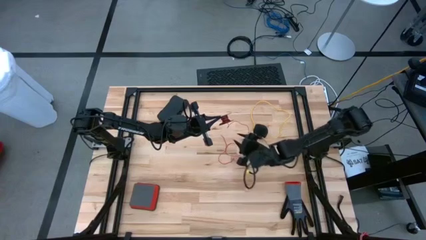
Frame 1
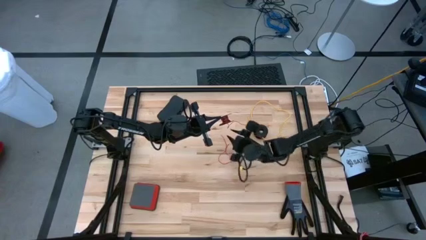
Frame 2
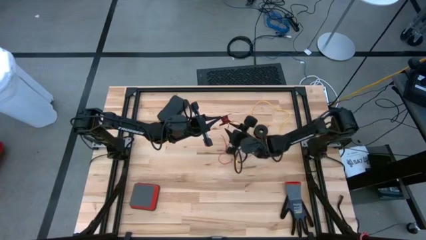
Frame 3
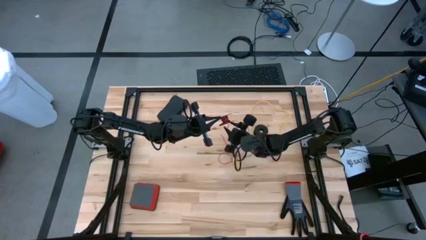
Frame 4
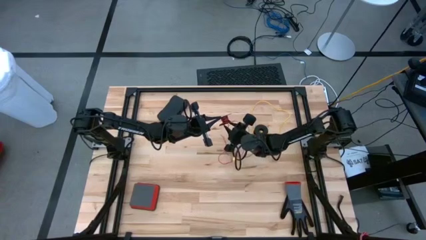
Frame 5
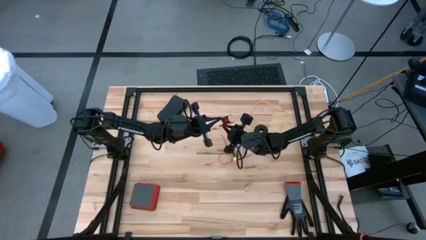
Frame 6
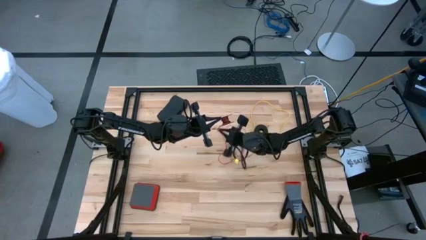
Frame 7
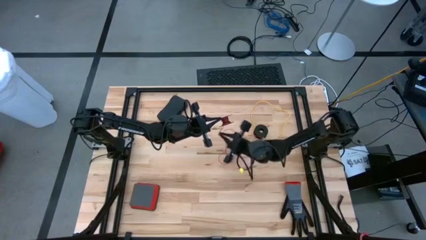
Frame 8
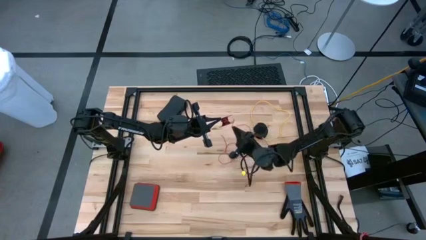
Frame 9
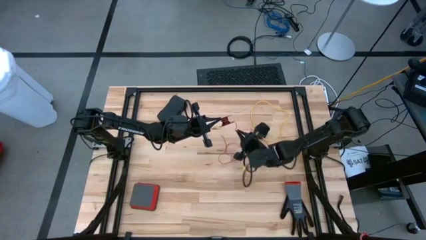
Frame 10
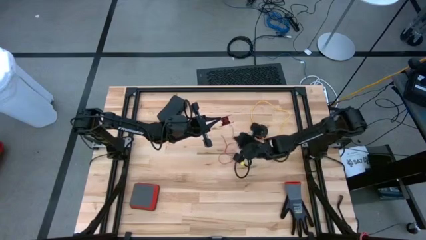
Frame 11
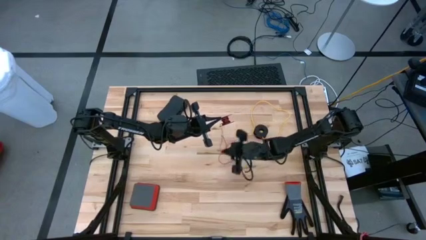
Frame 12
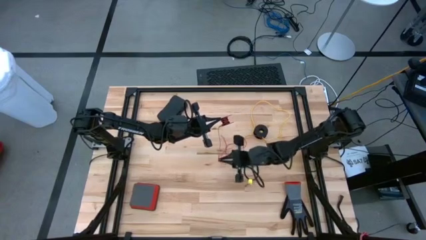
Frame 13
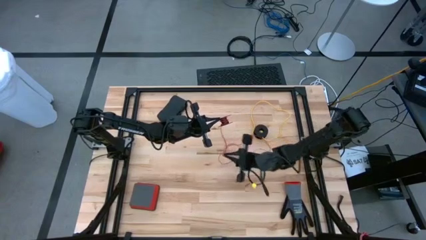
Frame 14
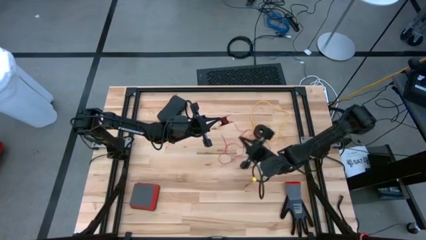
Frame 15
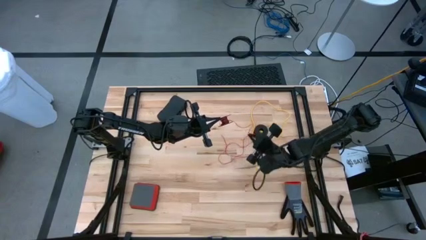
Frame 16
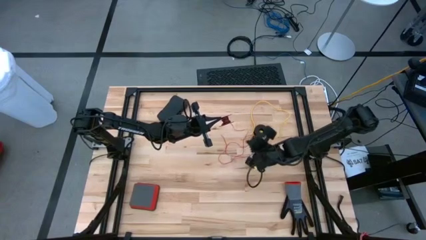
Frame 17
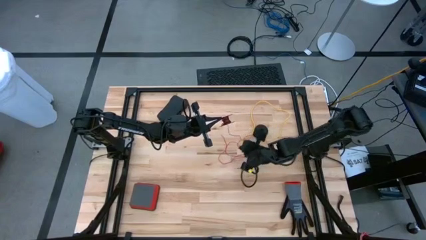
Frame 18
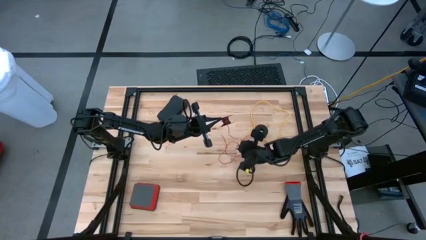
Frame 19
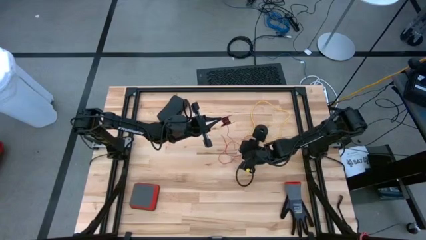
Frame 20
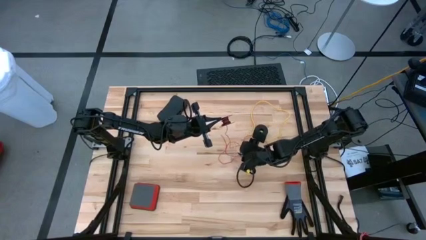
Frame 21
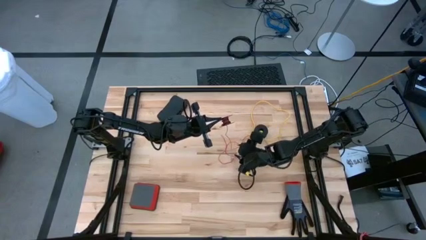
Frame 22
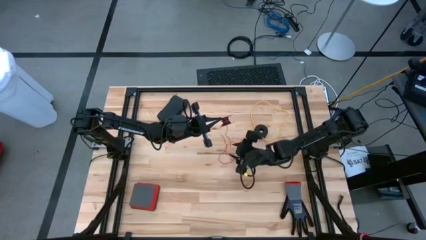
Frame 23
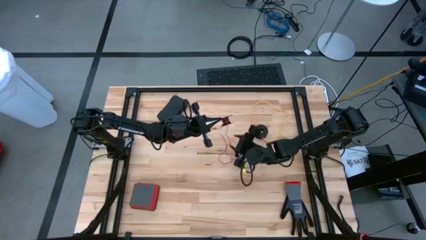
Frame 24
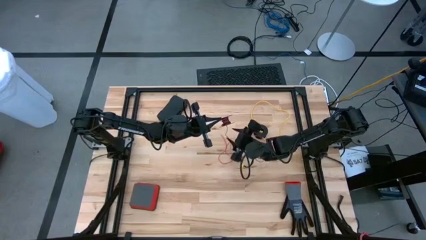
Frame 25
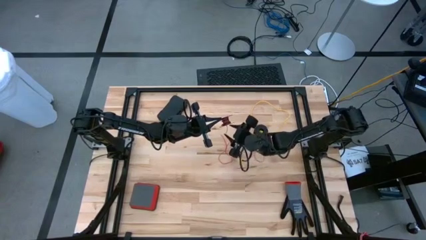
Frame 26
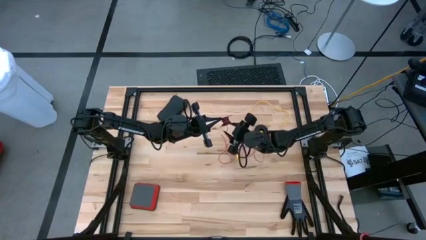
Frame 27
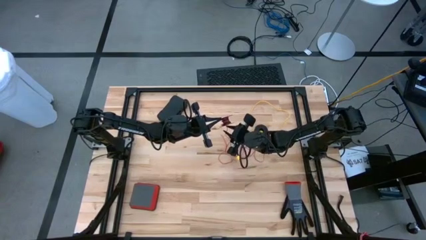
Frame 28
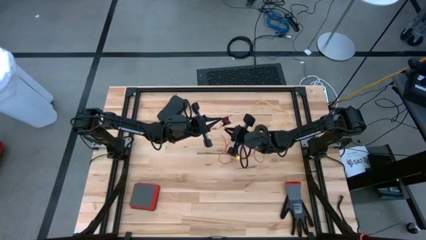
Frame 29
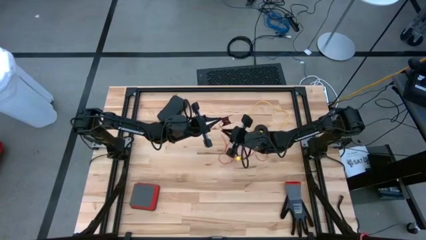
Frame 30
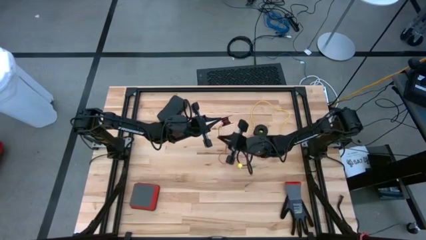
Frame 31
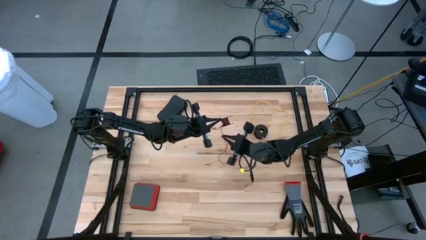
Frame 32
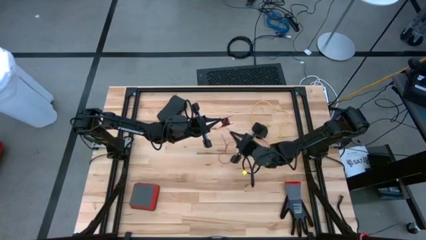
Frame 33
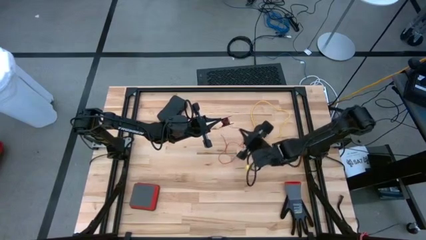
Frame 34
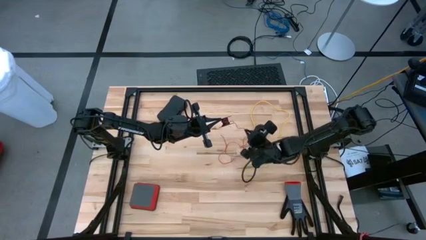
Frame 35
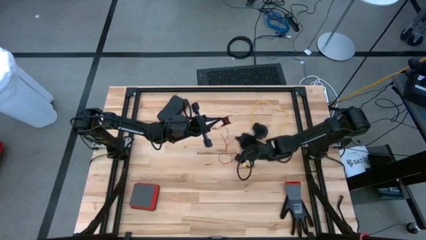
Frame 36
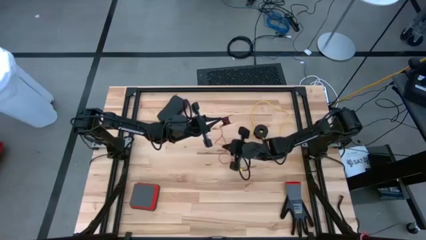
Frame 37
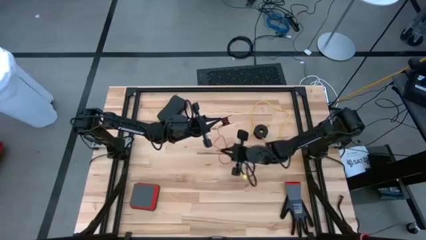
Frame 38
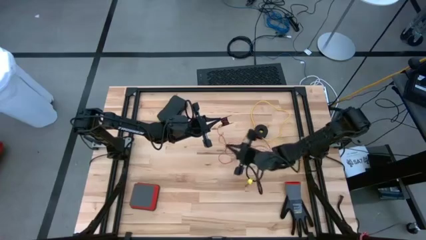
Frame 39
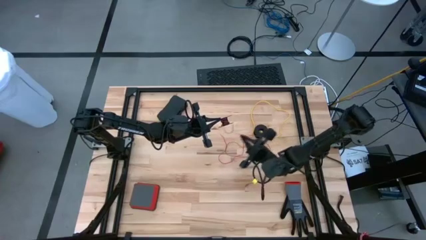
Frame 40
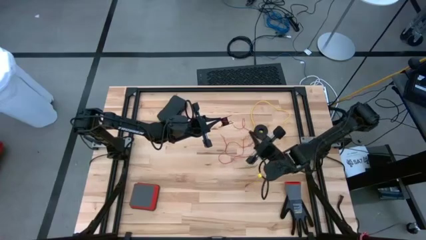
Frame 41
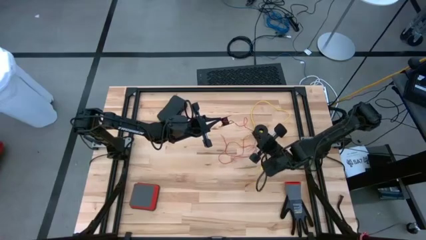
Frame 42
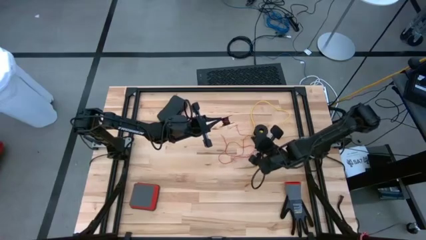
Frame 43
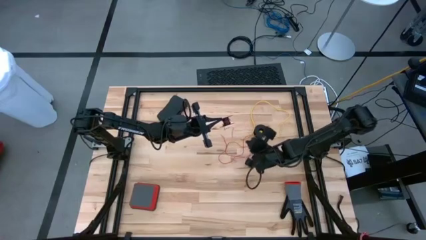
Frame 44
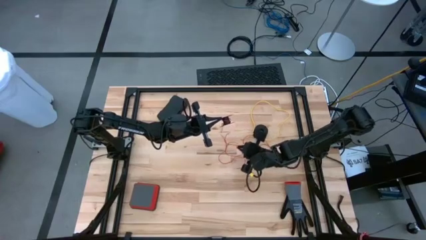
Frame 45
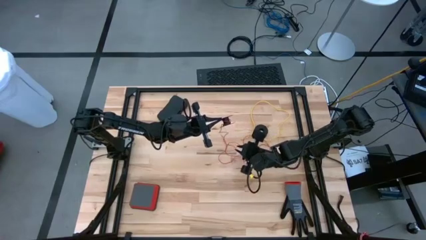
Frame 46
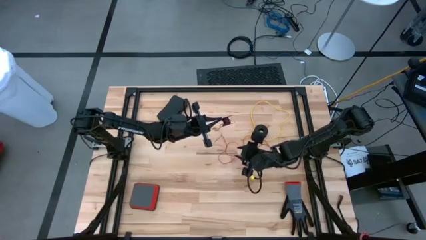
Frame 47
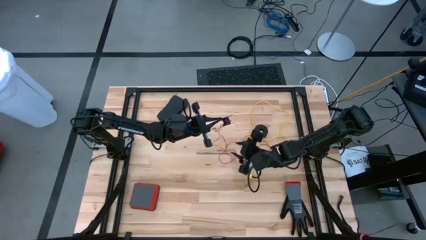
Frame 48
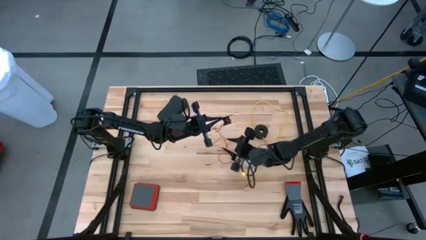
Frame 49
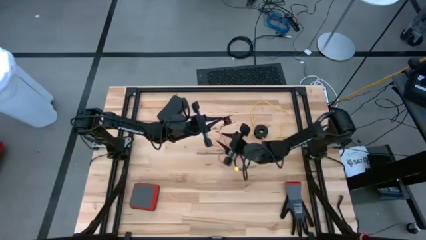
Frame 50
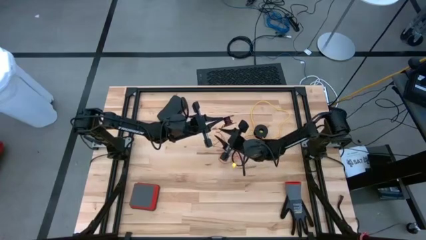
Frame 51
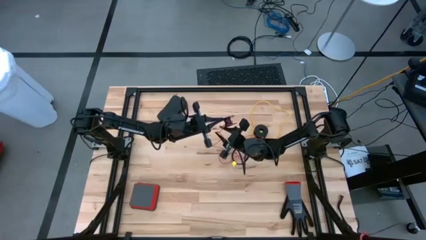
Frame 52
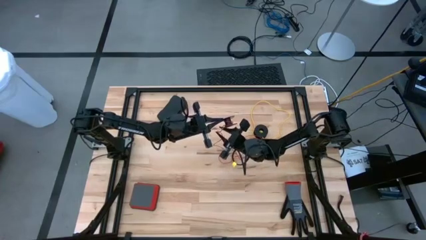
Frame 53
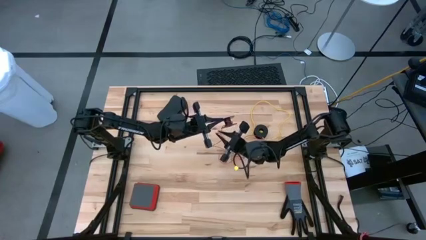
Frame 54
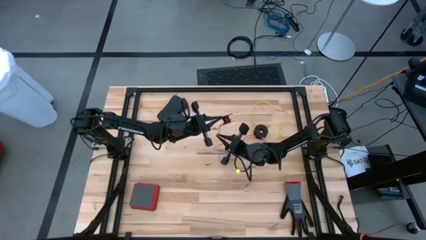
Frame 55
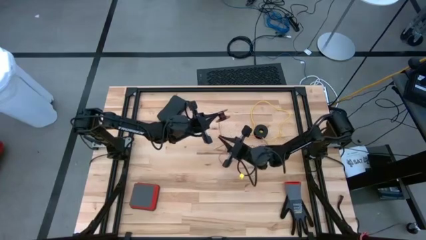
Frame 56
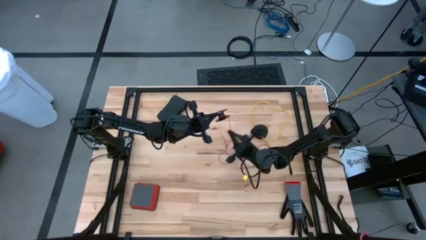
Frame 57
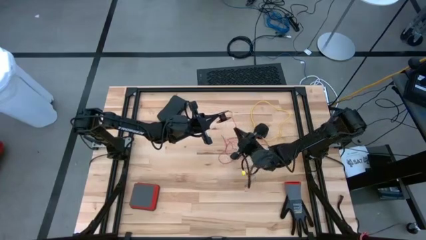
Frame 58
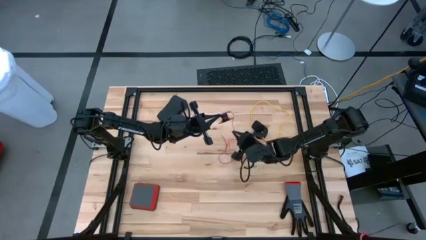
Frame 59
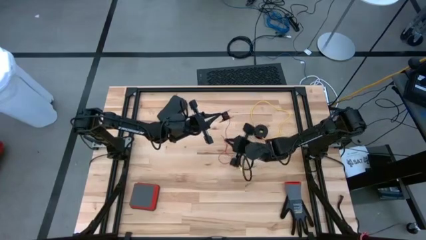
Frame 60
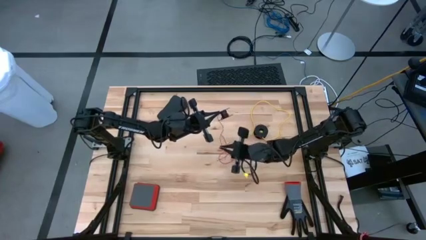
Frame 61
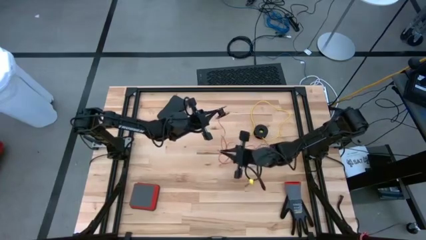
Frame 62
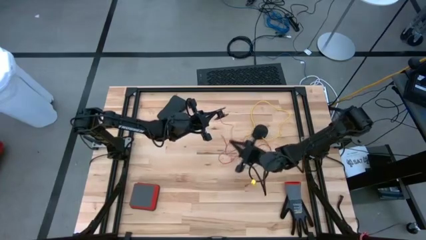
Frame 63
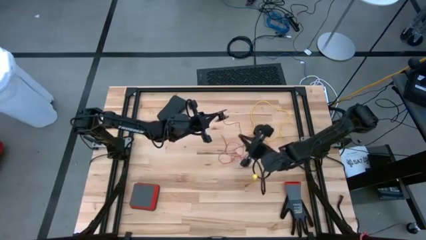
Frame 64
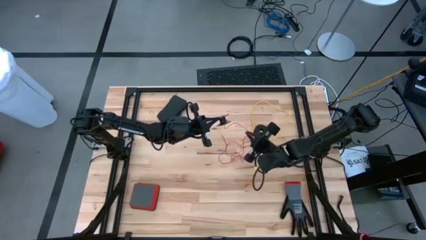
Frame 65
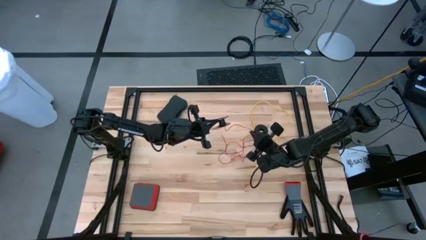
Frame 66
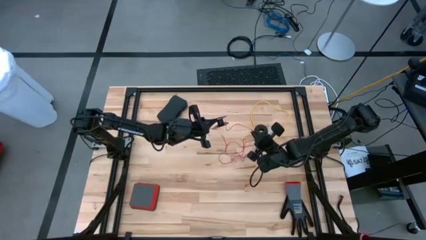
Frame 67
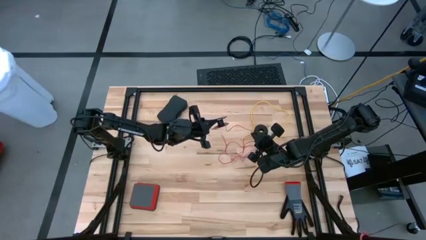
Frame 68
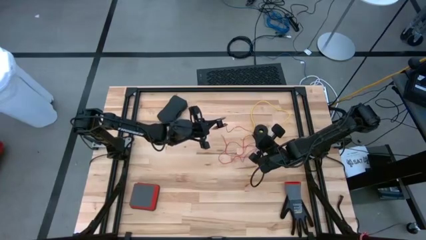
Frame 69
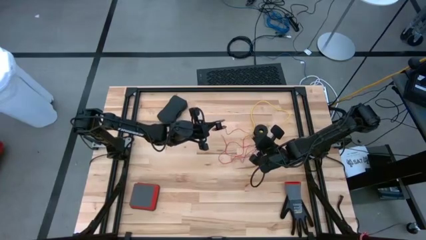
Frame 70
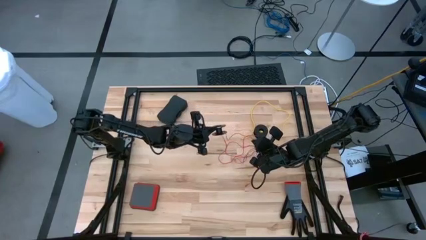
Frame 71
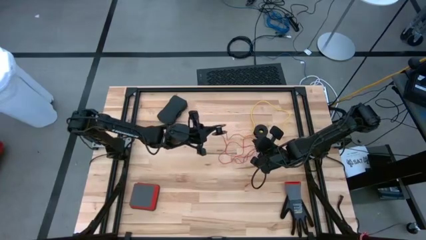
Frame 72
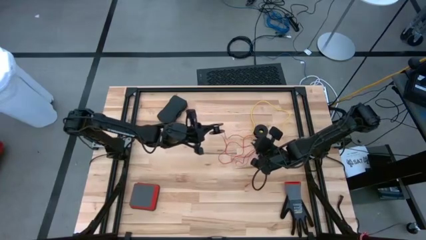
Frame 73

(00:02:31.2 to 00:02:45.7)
Task: Coil cords
Uncoil the red wire from the black spool
